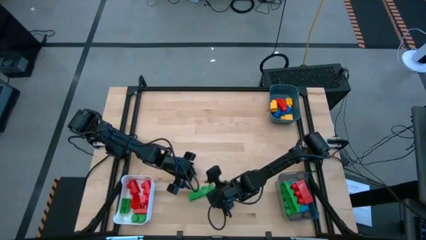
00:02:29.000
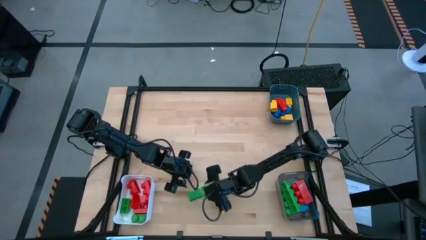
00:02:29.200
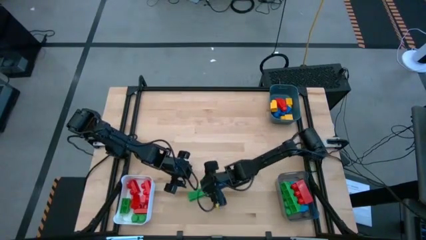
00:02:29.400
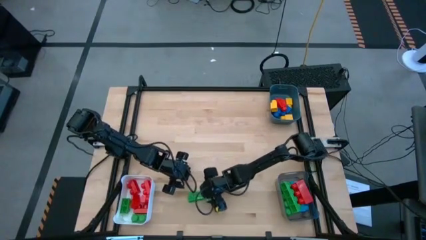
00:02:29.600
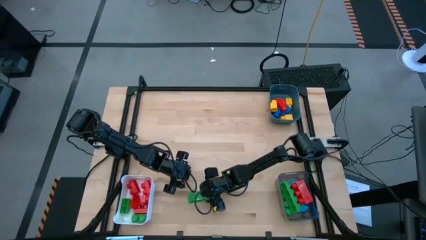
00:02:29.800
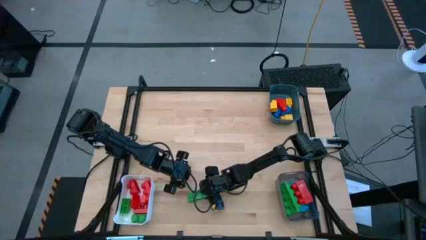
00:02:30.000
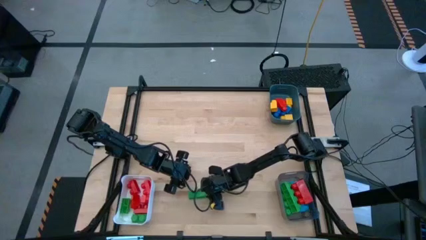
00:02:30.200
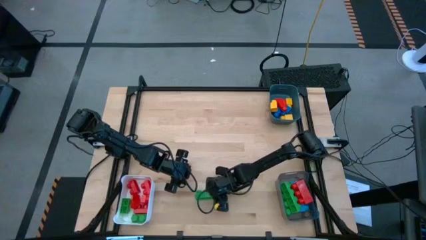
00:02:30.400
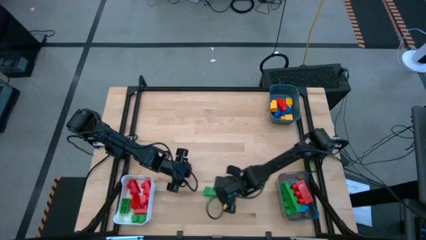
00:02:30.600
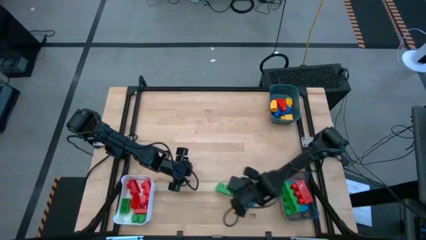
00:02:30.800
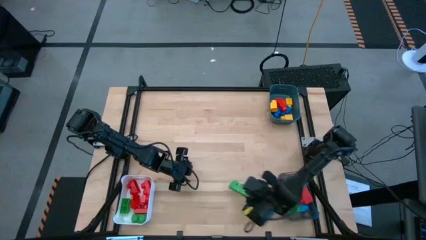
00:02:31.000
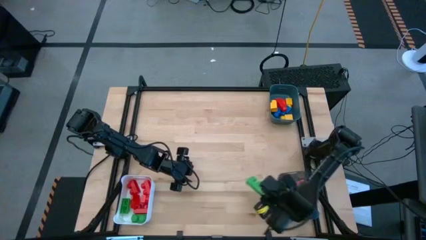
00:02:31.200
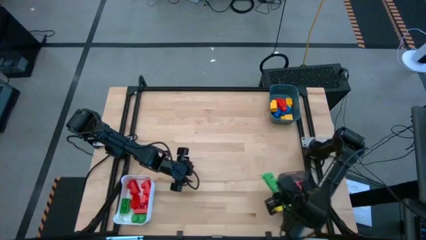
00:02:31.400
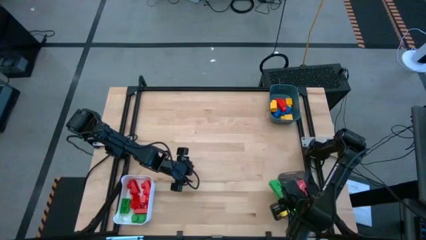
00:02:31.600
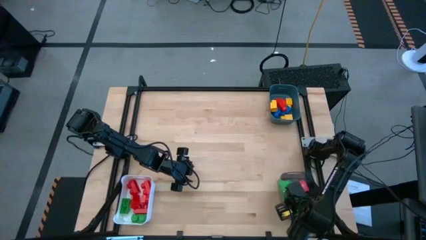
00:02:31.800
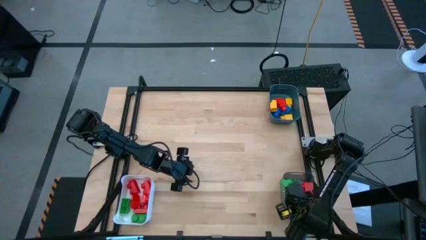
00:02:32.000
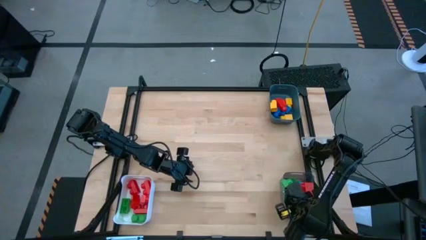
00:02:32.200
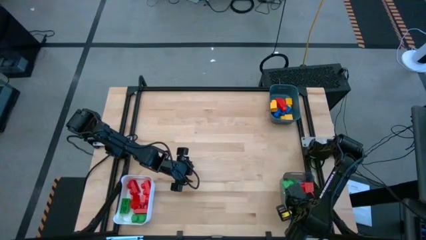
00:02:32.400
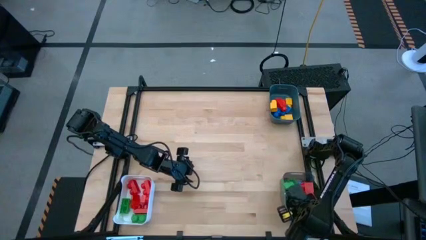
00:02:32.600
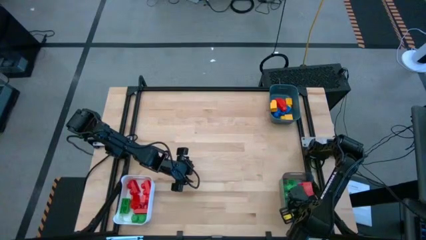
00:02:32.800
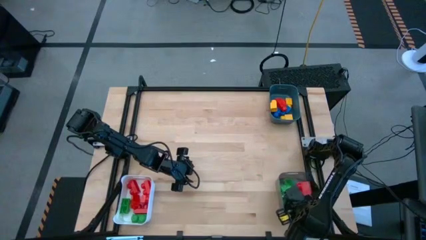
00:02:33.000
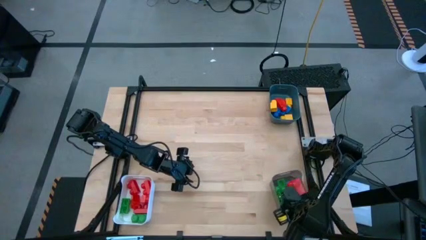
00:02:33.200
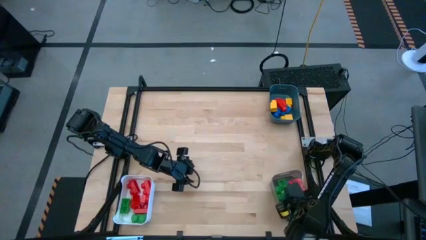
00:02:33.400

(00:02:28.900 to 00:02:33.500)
Task: Sort blocks by size
Put the four stud green game piece into the transparent black bin

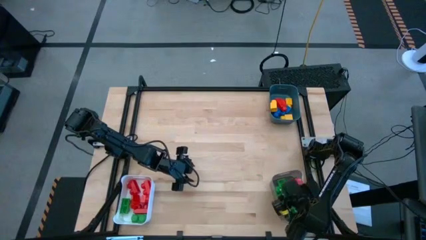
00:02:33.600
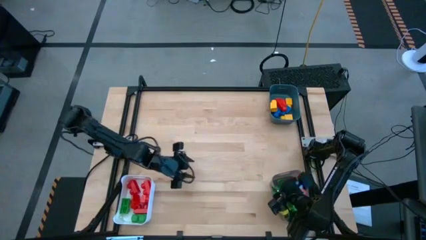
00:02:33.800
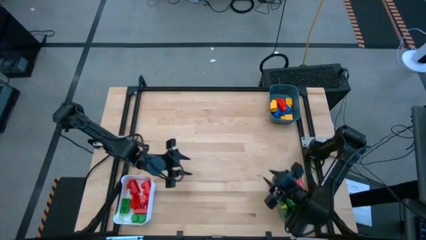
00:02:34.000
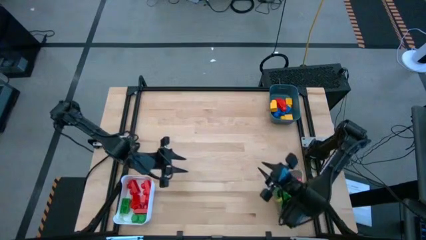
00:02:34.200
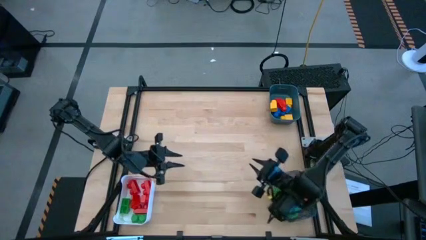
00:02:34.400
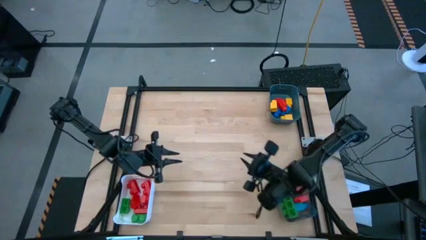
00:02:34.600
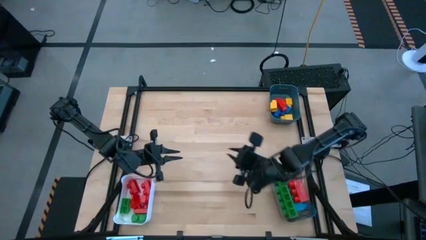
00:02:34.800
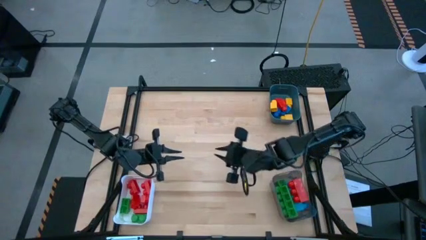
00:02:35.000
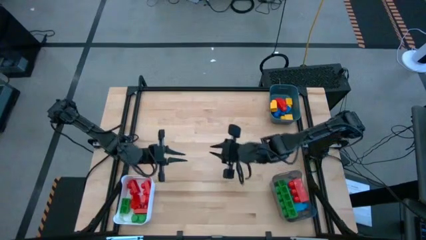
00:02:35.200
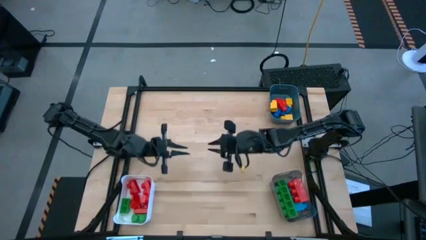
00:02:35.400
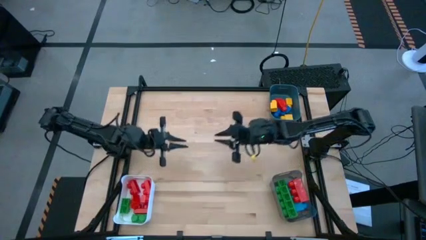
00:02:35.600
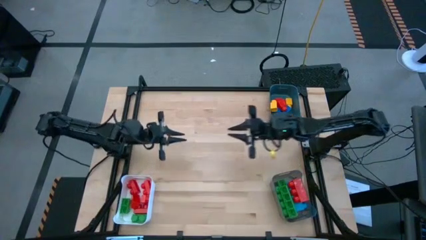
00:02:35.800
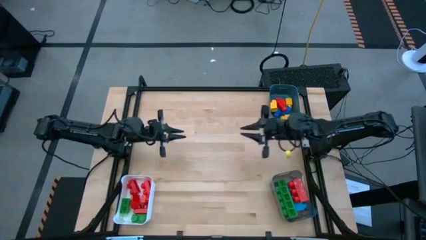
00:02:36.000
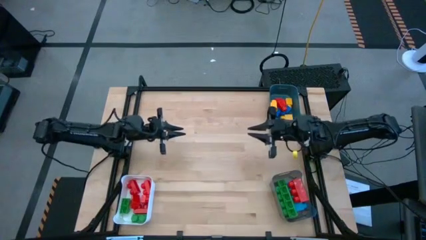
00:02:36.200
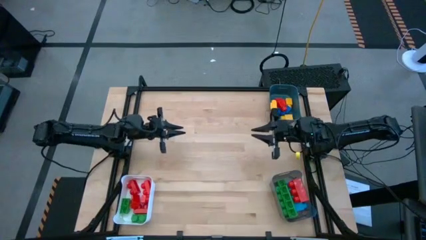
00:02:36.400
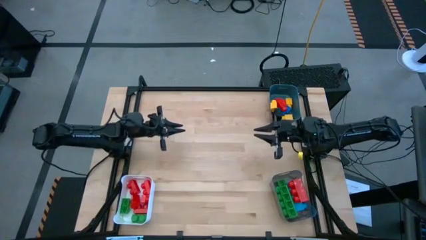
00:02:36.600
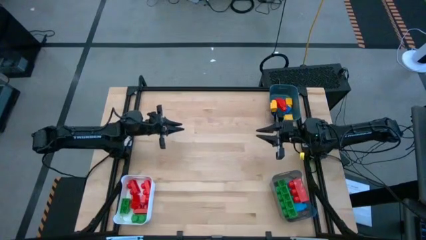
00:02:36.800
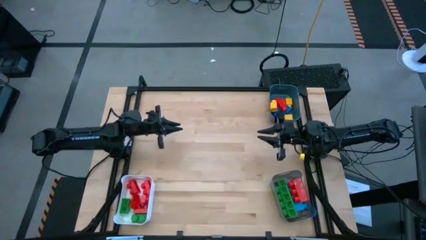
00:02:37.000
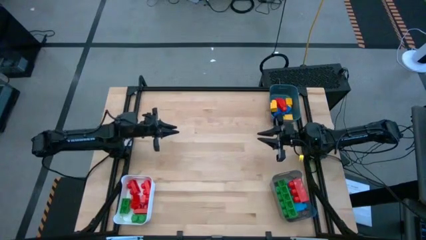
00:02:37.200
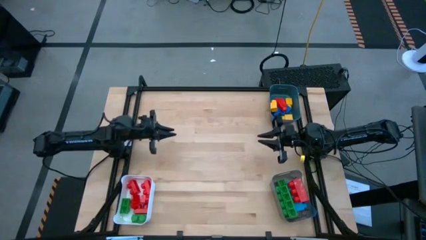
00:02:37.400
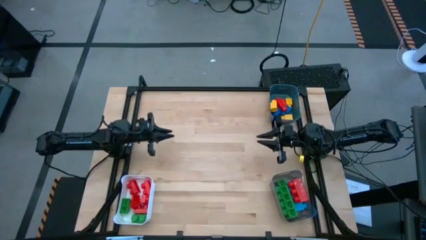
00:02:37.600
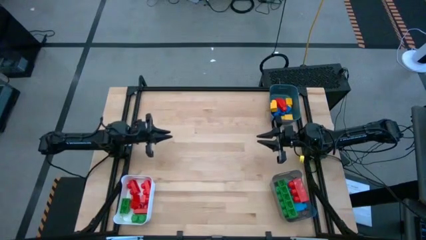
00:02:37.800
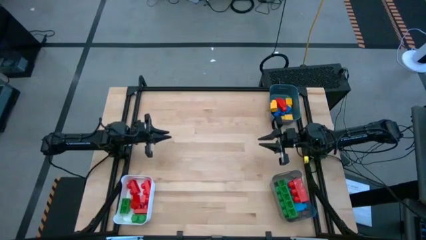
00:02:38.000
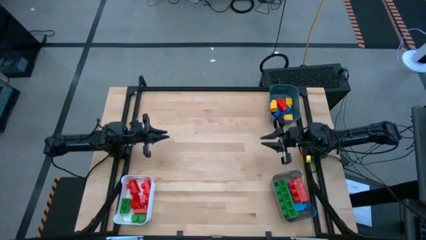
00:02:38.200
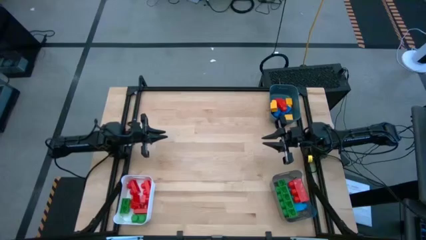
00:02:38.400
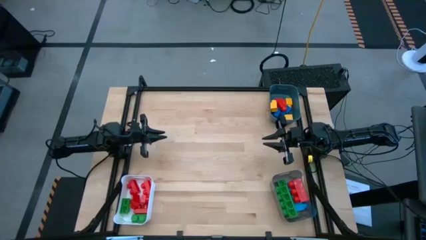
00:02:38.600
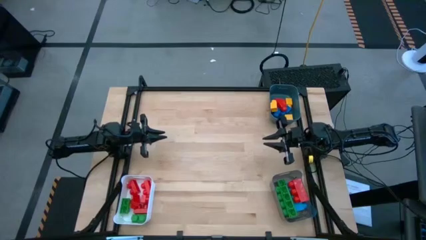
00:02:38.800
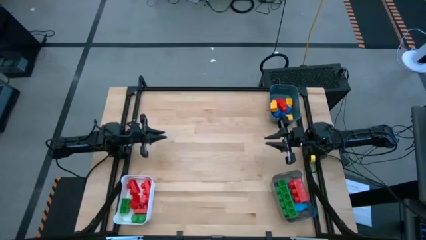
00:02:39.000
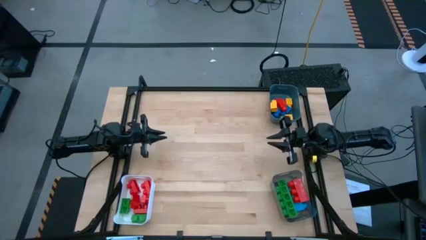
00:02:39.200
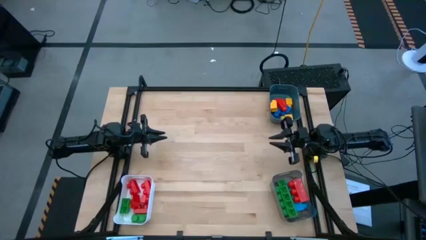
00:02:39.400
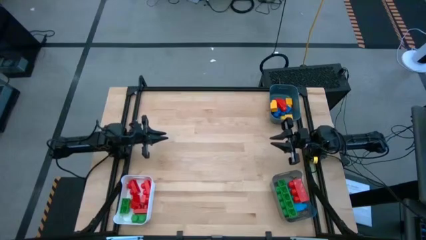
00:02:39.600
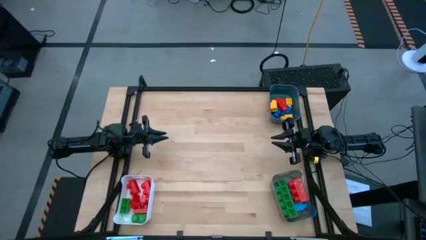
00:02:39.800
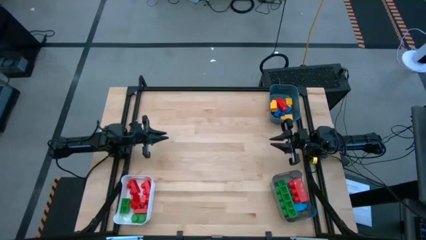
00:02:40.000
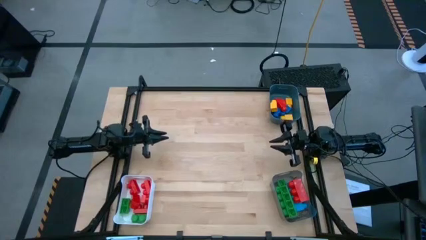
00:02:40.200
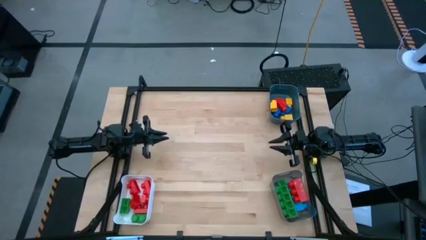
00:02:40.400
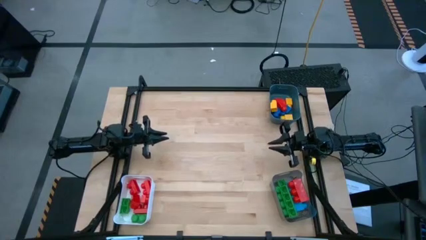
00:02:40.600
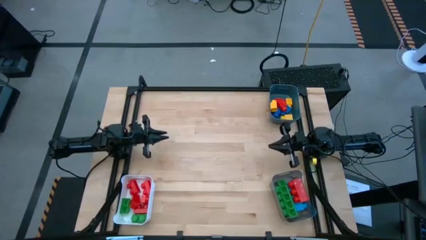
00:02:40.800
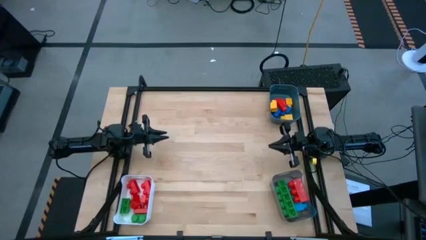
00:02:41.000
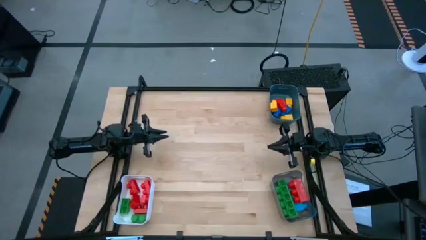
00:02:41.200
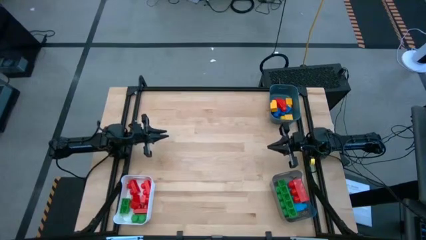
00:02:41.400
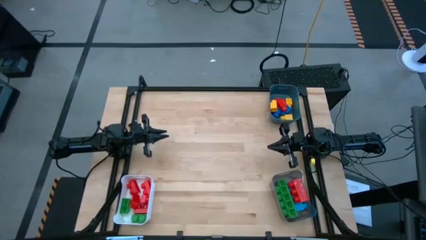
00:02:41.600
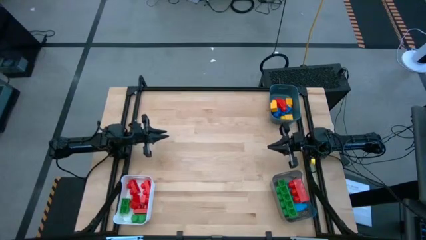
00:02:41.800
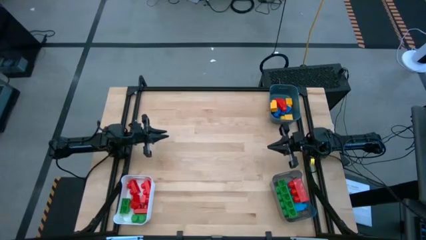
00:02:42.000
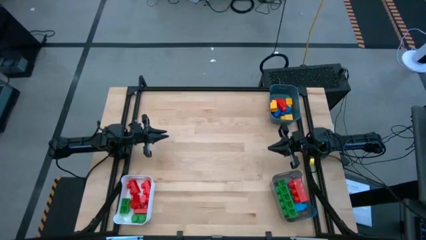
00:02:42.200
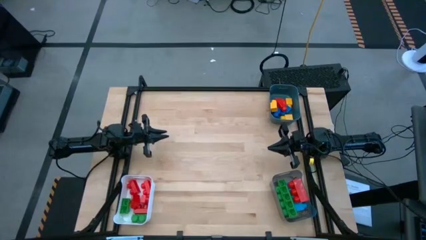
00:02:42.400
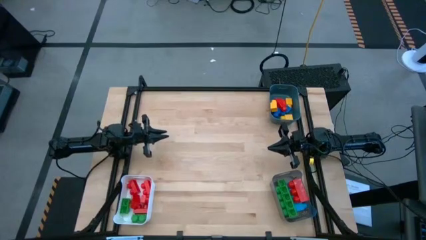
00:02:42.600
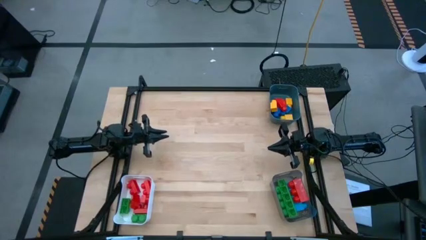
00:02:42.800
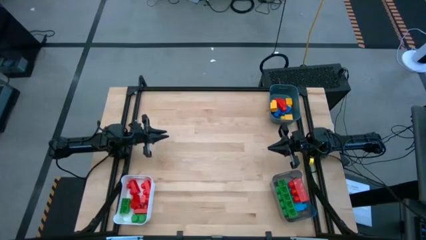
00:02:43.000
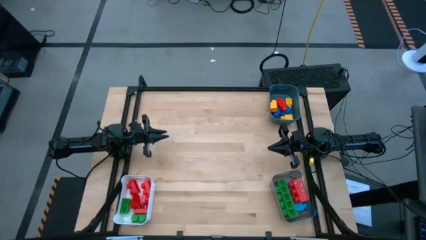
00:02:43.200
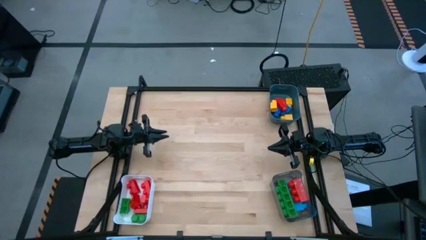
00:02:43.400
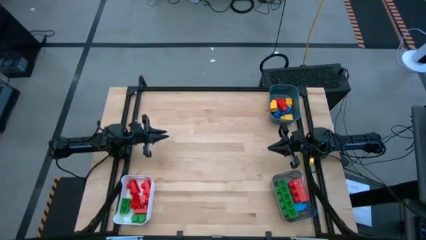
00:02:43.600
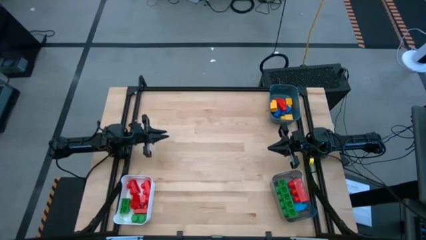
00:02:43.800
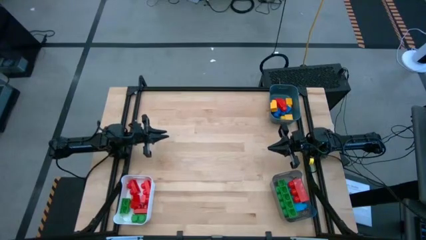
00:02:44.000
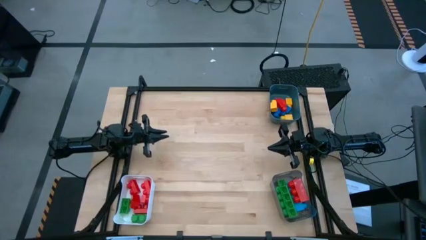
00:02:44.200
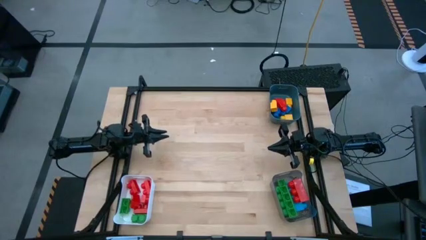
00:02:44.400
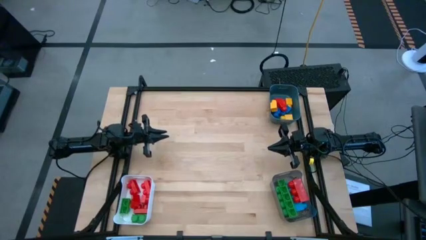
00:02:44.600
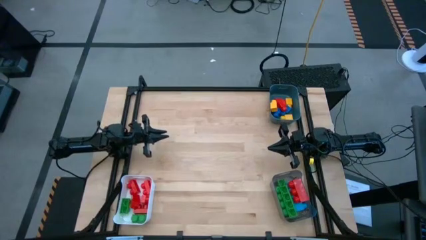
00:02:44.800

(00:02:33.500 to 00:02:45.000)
Return to Home Position
